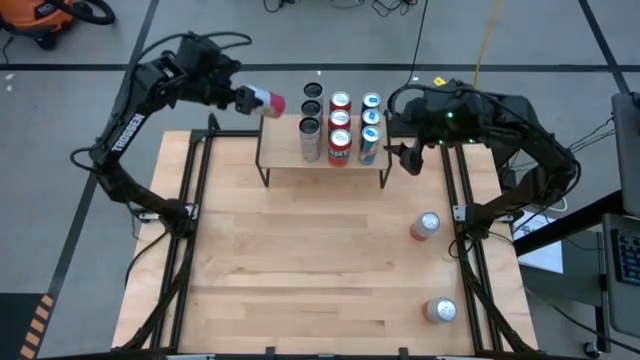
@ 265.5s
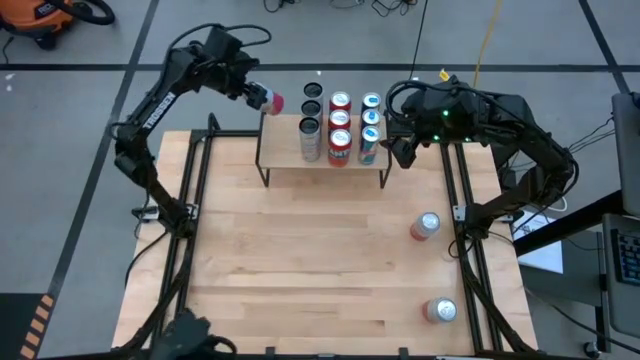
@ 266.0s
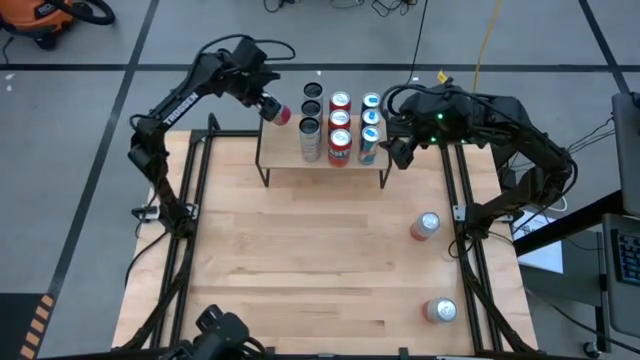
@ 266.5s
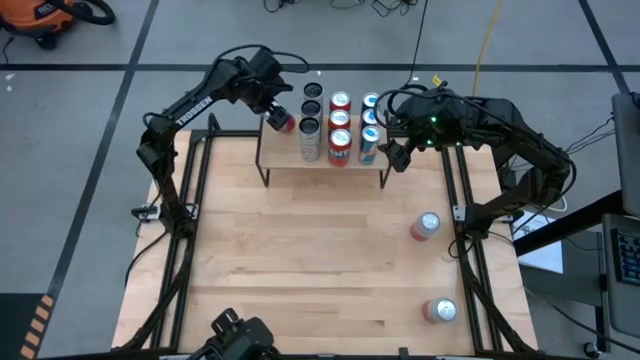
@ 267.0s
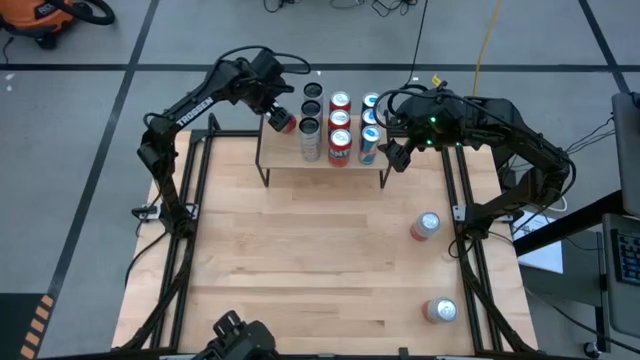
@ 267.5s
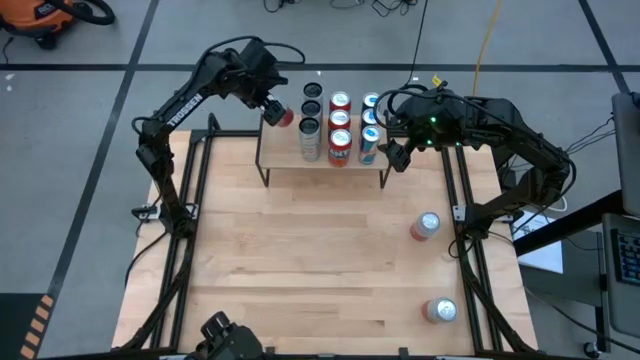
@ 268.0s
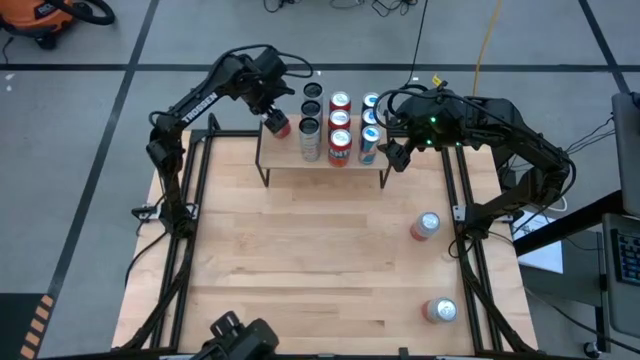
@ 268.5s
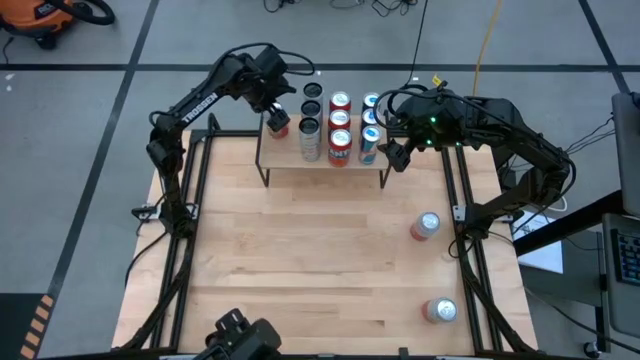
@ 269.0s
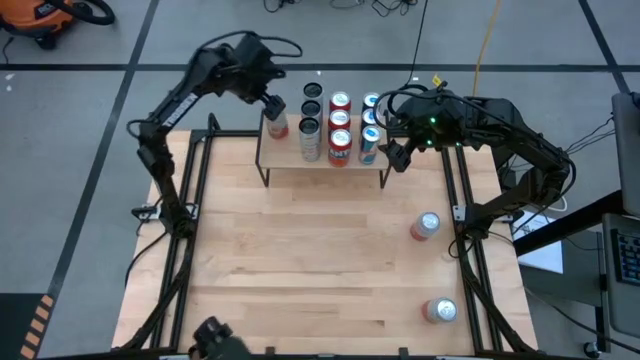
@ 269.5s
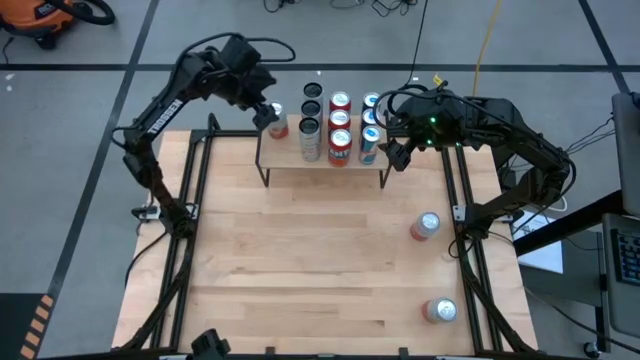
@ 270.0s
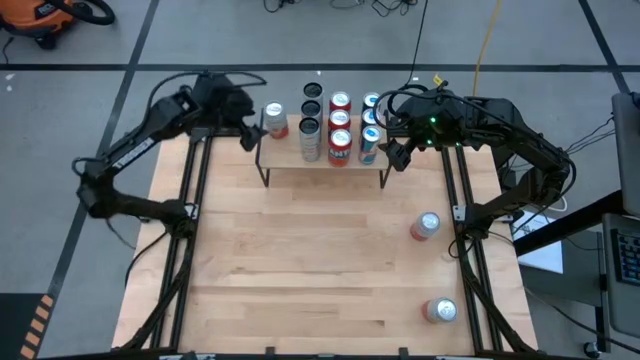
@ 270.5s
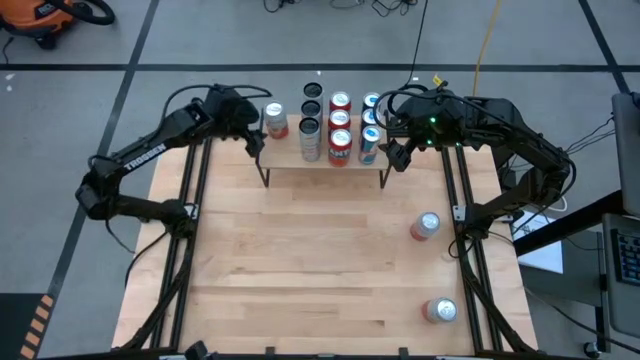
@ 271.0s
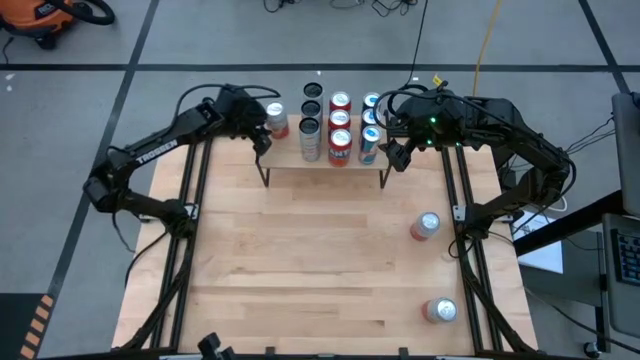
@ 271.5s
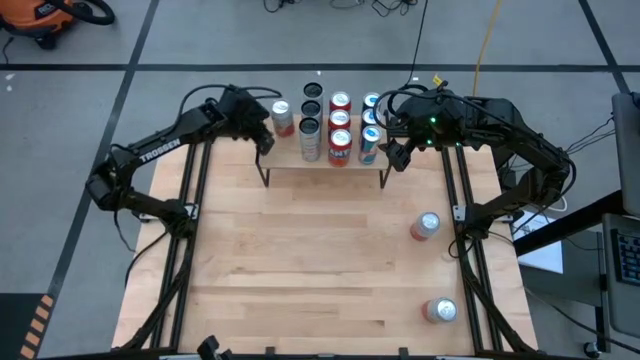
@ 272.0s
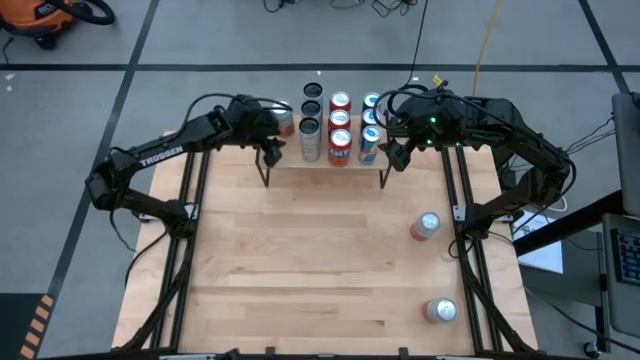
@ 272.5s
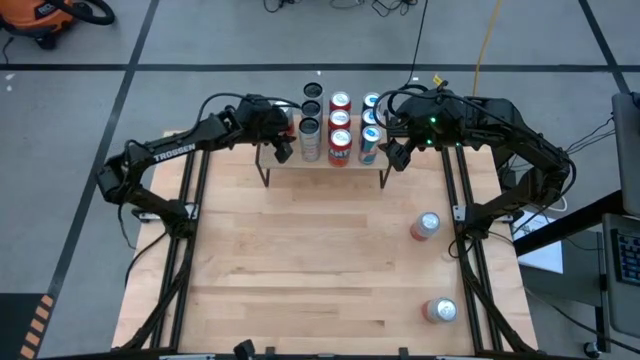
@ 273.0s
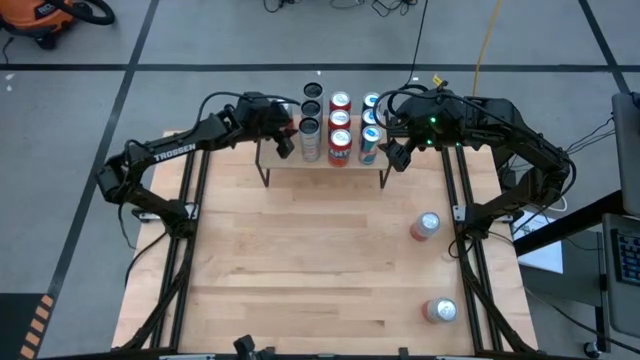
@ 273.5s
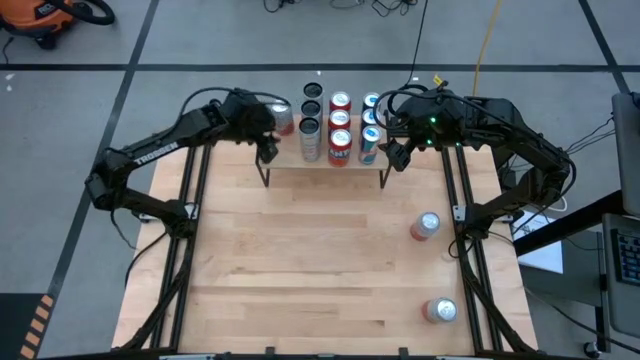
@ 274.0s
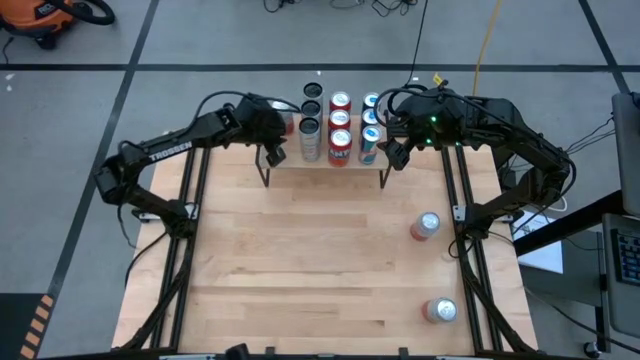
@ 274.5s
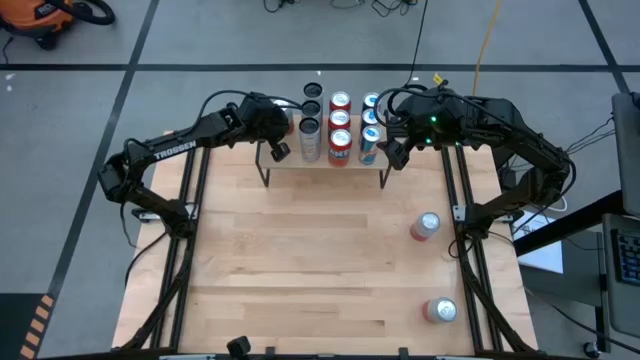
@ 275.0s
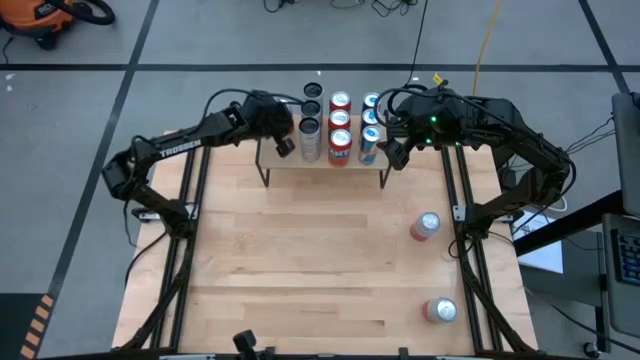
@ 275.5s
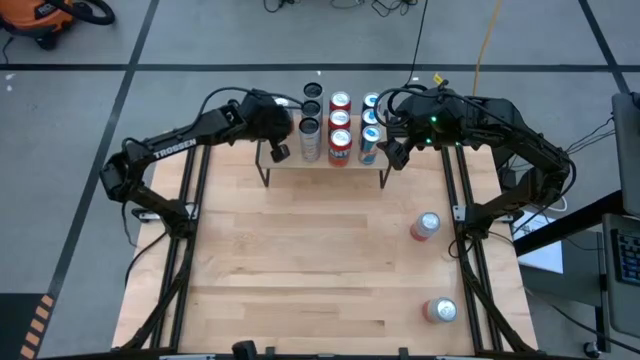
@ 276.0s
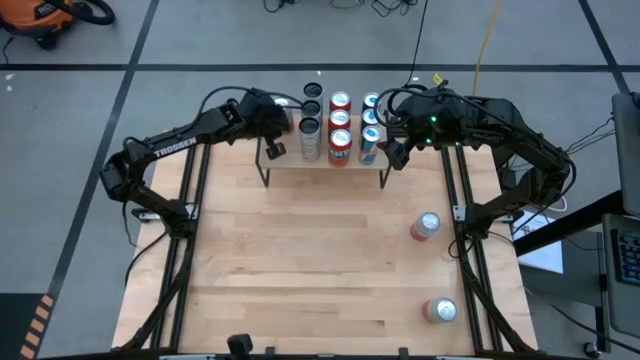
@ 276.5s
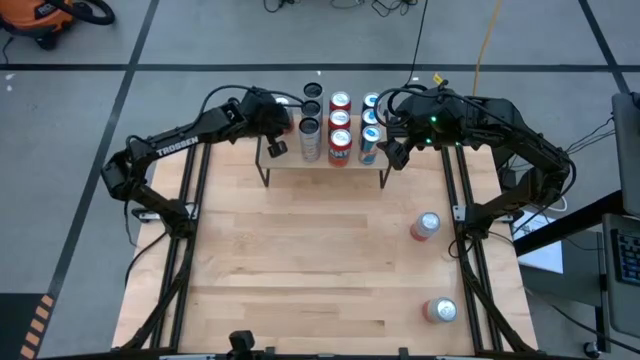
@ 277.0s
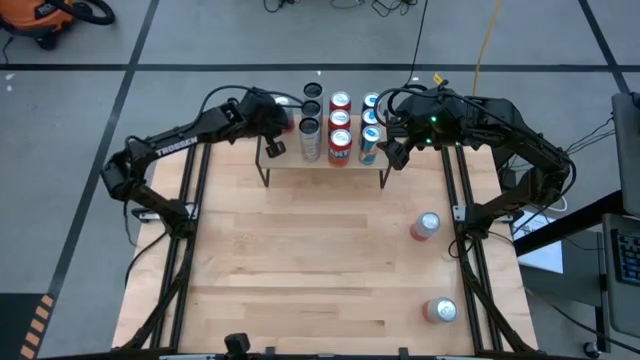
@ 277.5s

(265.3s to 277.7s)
Task: Place canned beverage on shelf
Put the left pink and white soda can on the shelf
